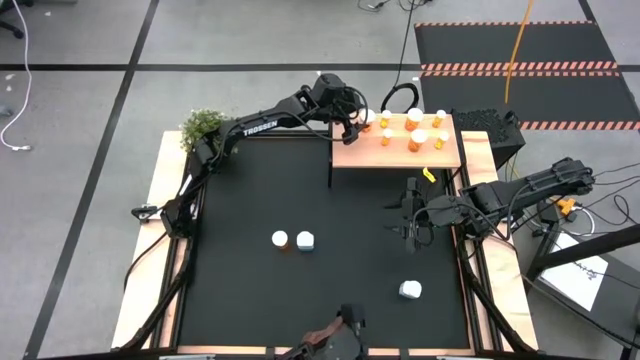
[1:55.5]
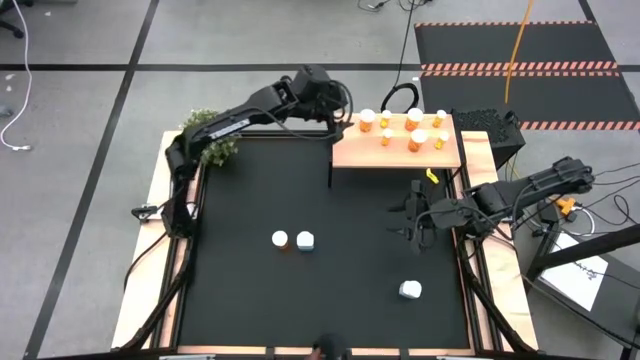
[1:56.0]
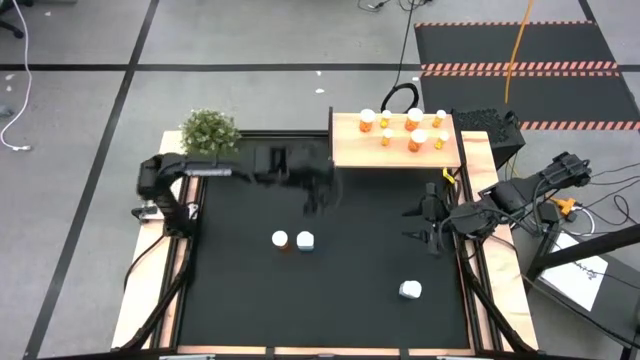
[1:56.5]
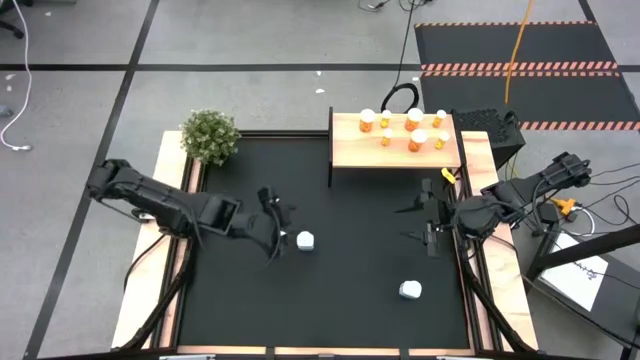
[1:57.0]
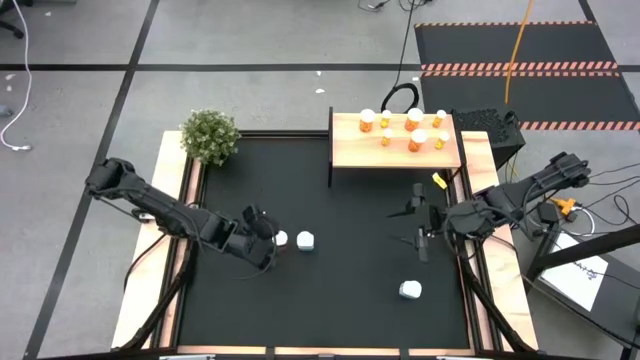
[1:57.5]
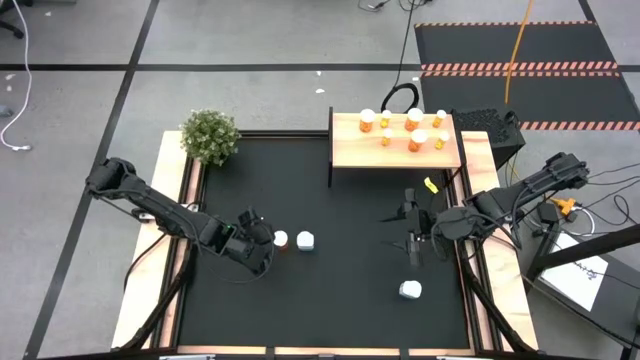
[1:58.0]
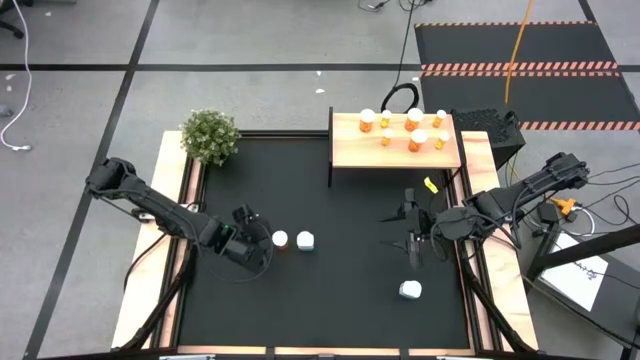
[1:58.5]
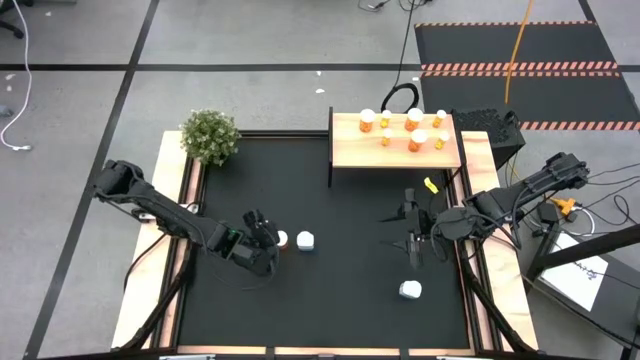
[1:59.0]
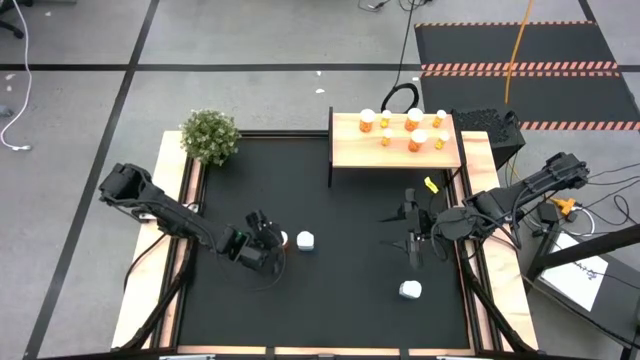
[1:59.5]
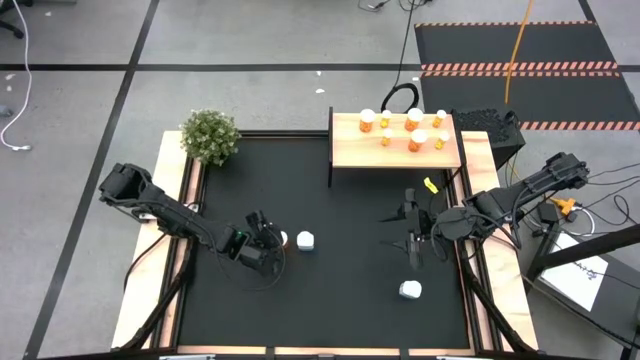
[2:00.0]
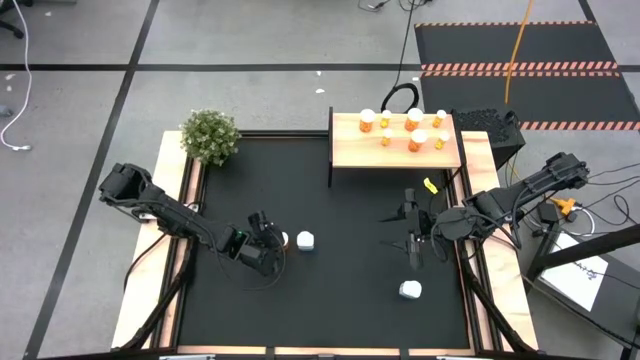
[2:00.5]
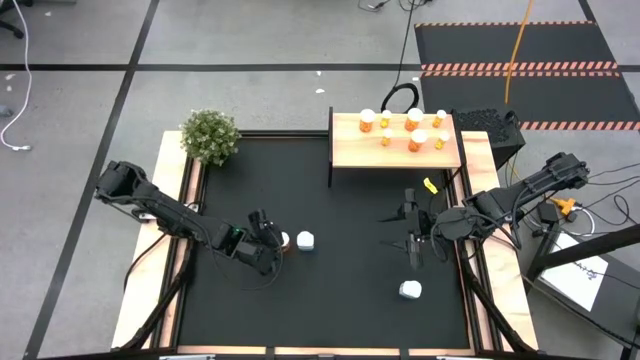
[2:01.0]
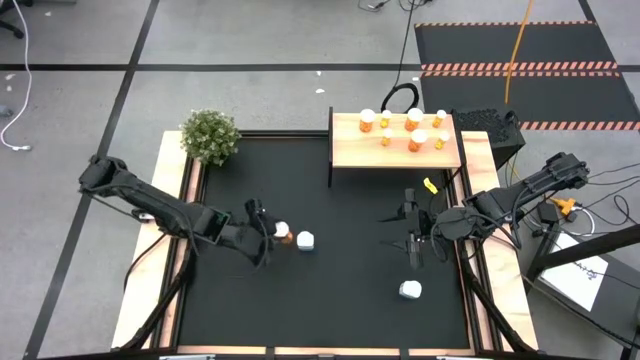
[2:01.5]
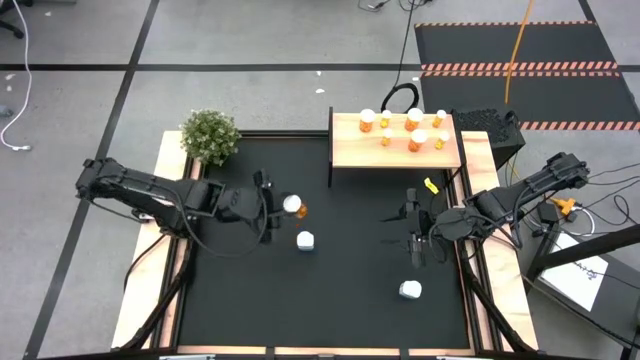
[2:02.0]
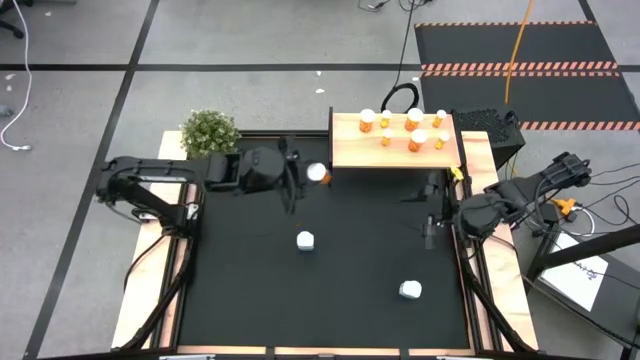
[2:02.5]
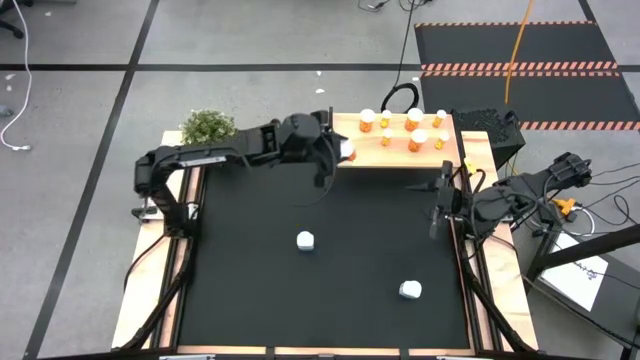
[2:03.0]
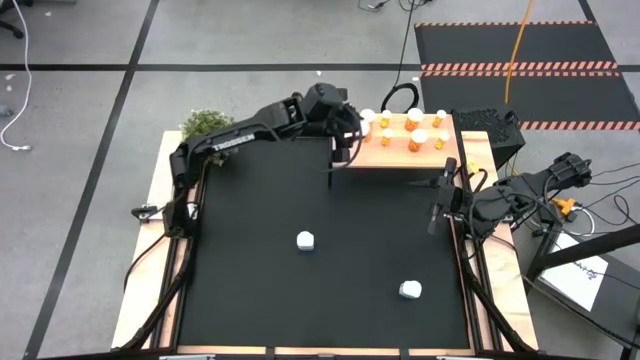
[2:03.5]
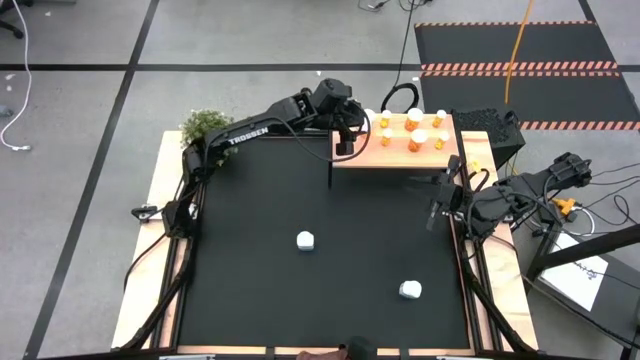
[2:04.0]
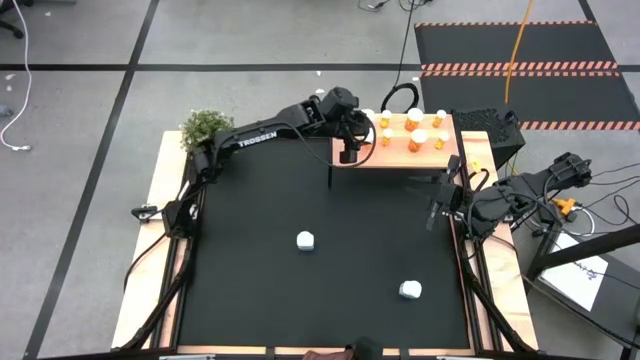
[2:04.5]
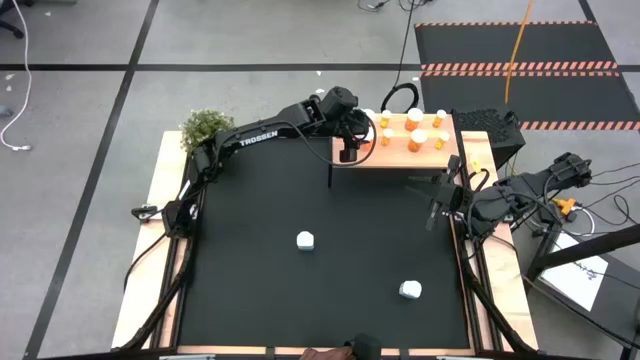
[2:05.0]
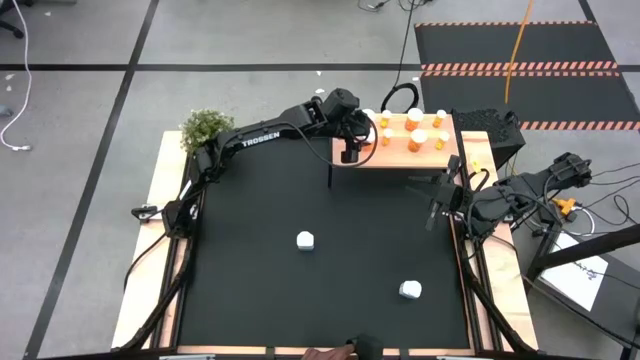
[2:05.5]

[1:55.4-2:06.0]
Task: Pick and place medicine bottles onto shelf by color
Put the large orange pill bottle on the shelf

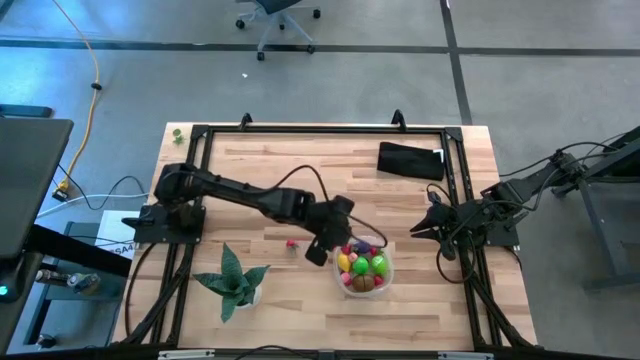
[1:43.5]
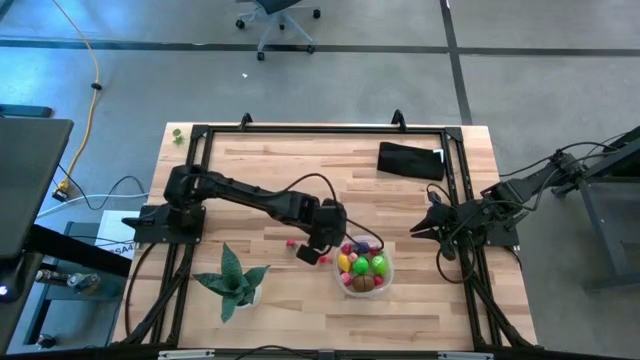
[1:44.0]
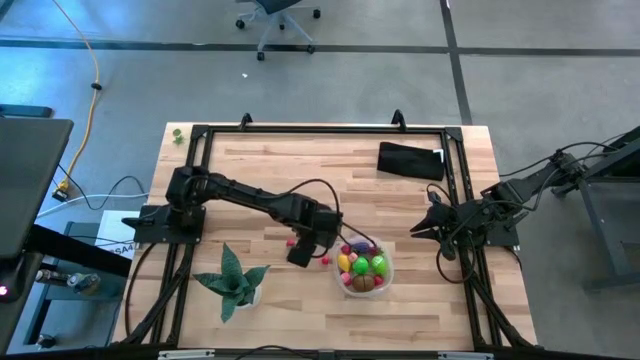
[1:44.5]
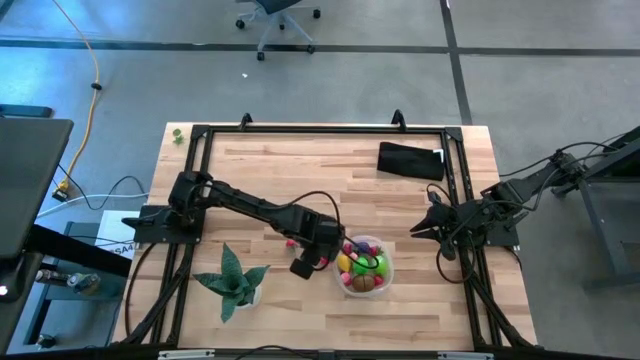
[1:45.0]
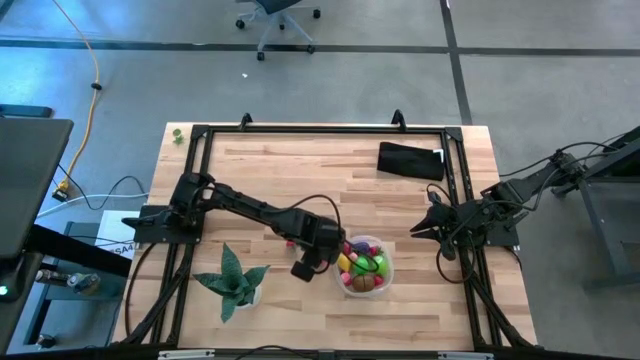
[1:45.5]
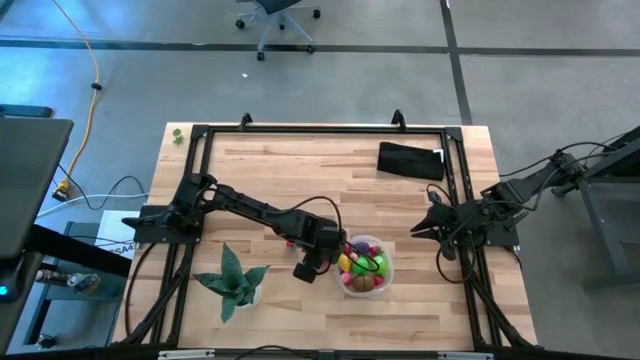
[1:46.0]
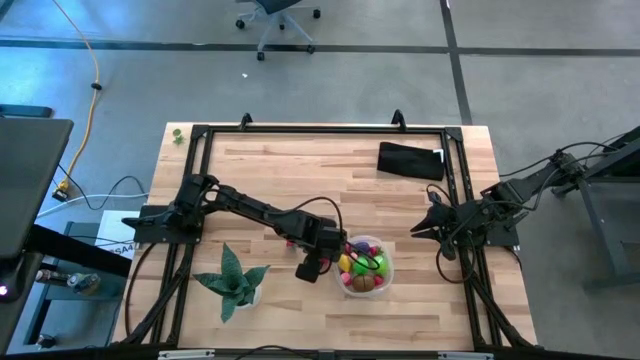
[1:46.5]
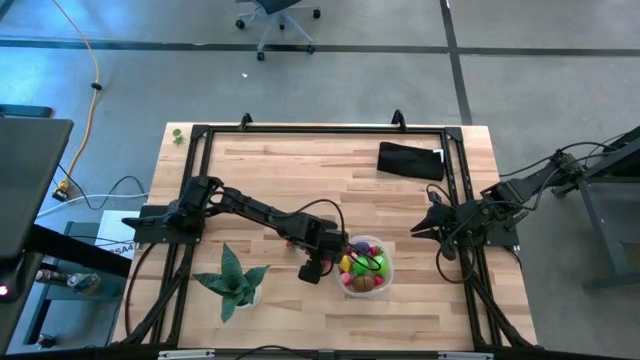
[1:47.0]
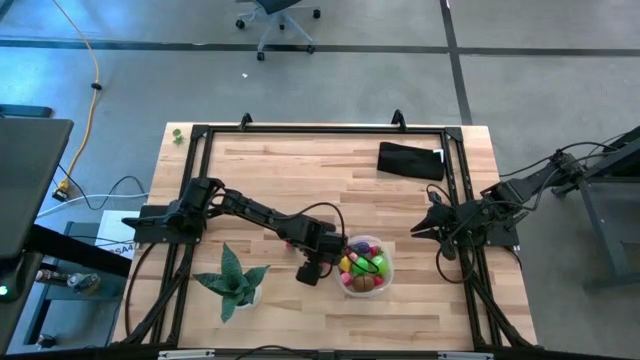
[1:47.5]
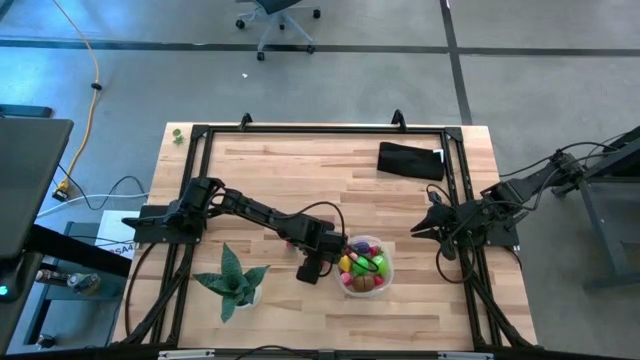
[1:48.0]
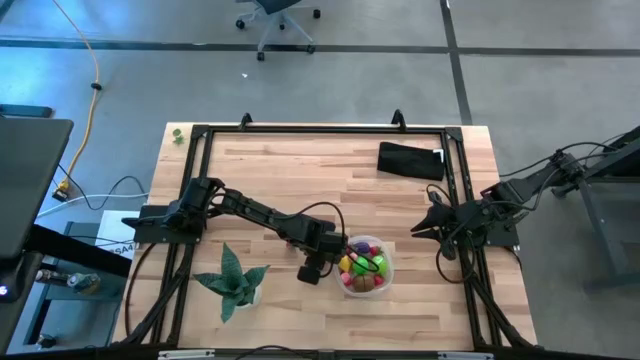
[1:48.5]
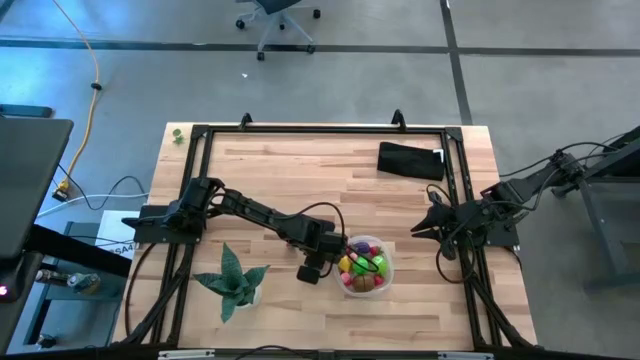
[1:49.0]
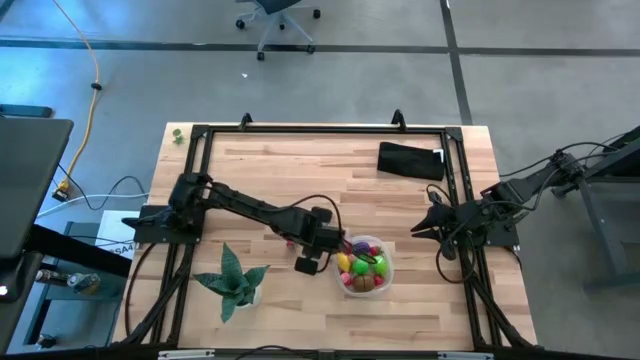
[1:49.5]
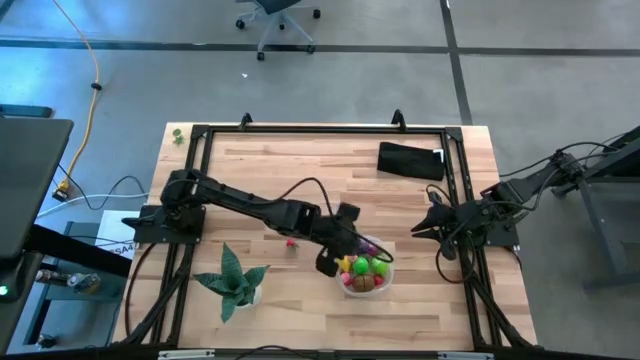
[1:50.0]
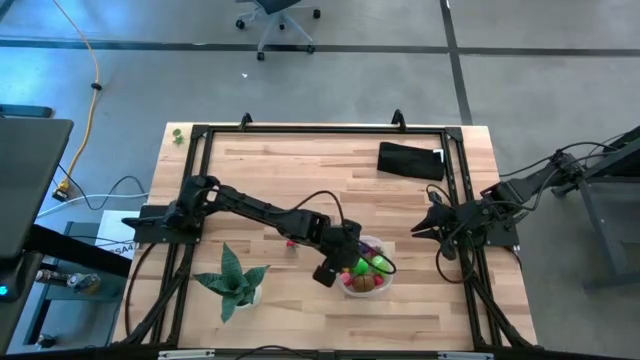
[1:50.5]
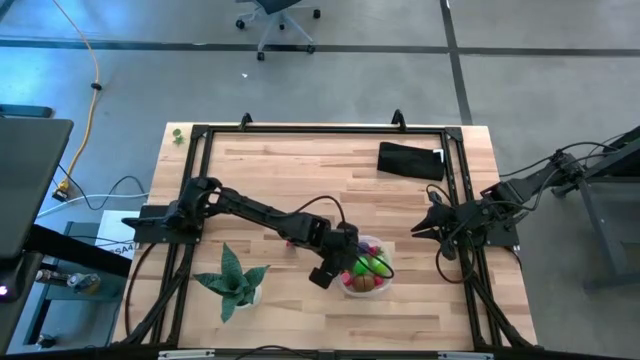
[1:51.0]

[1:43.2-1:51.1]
Task: Pick and placing Produce into tupperware
Put the cherry into the transparent bin
